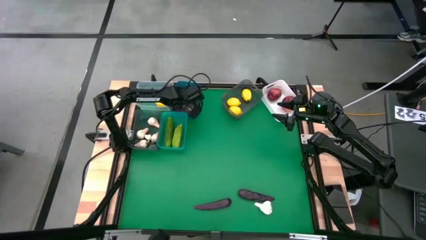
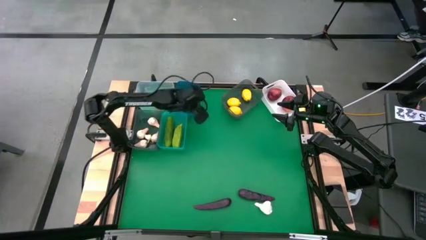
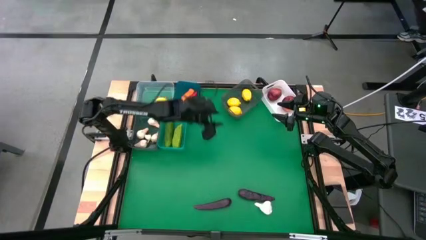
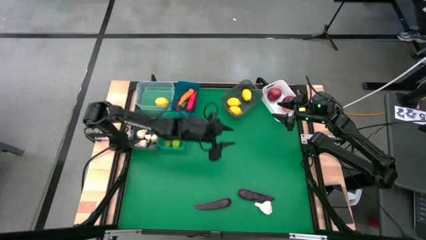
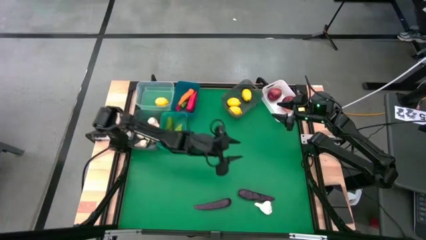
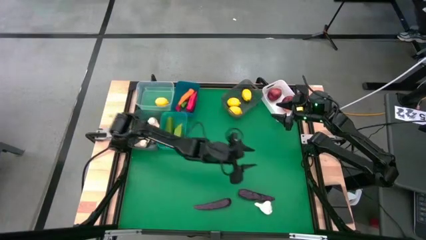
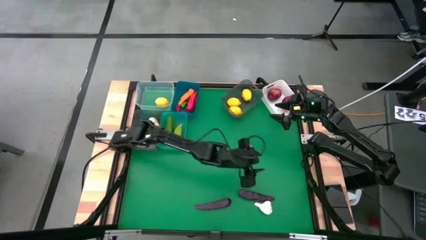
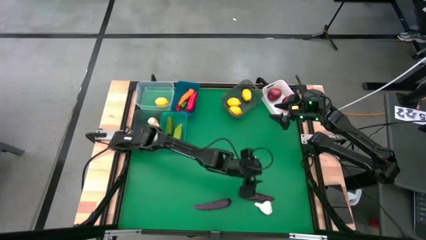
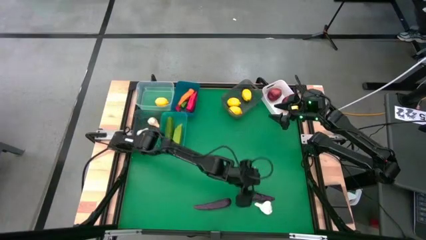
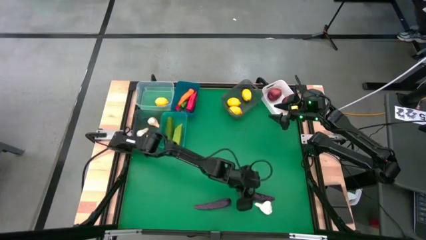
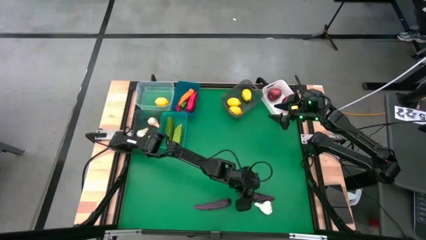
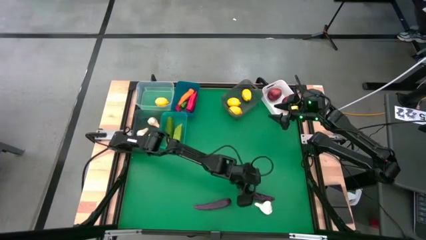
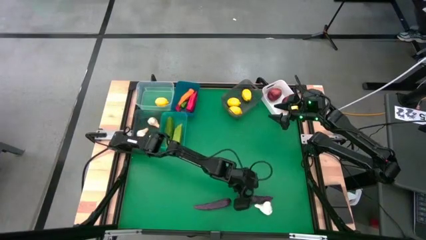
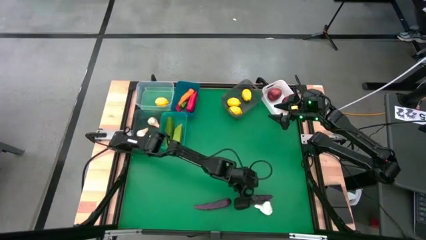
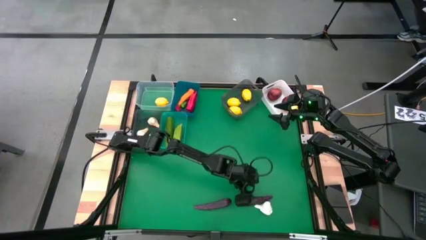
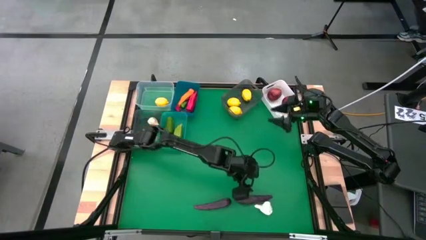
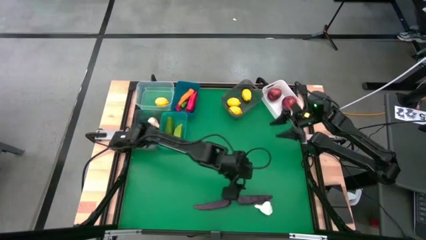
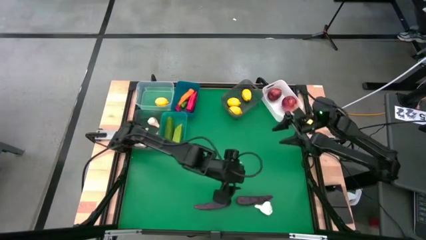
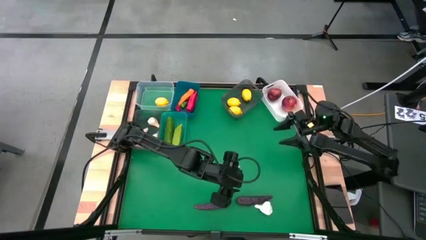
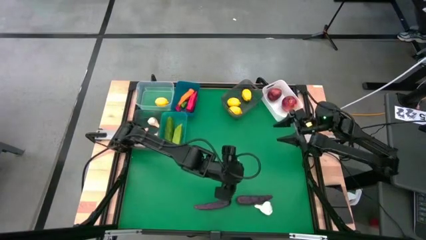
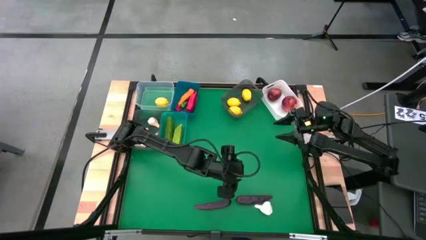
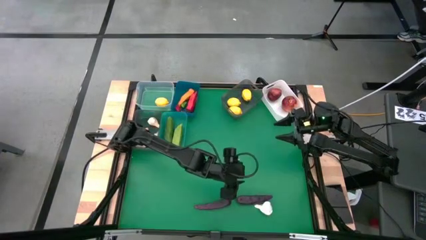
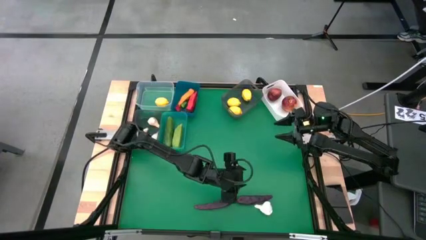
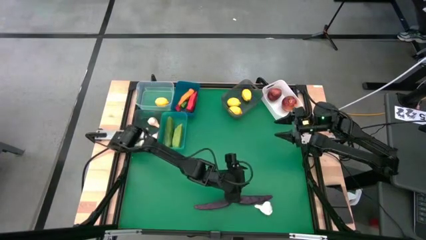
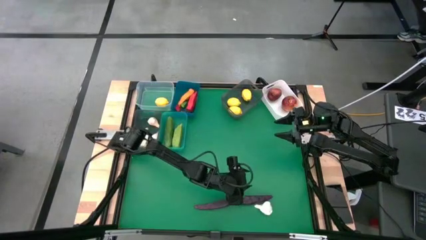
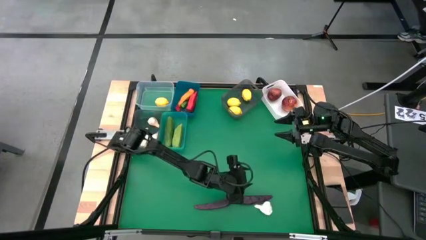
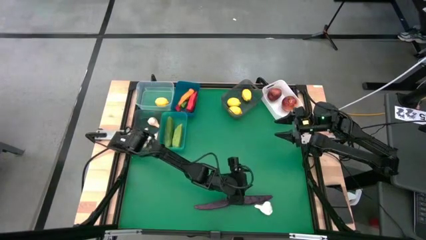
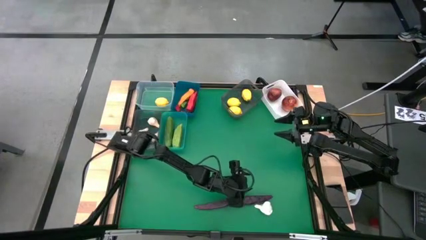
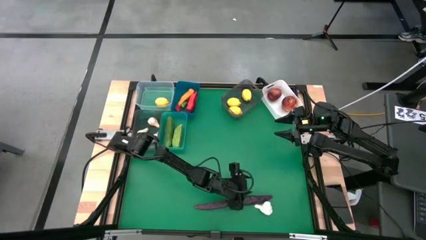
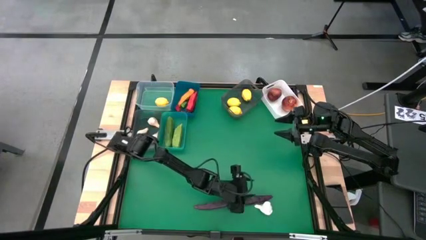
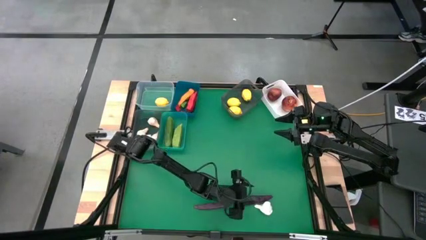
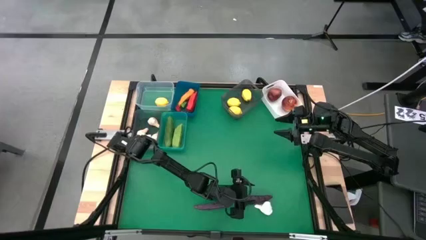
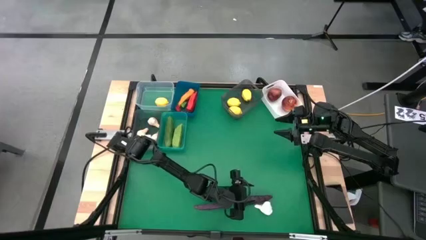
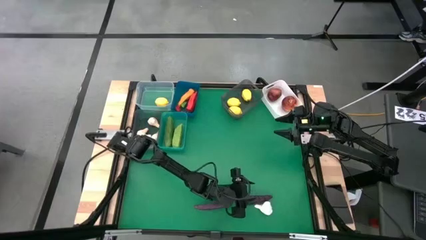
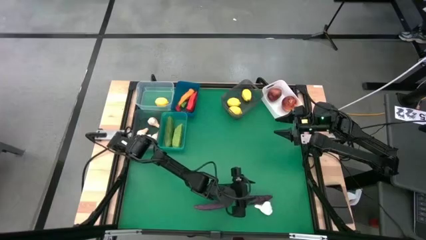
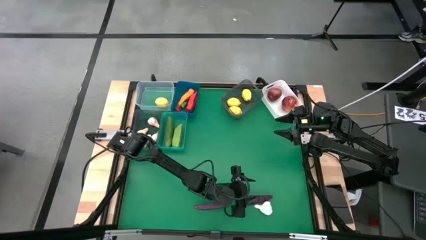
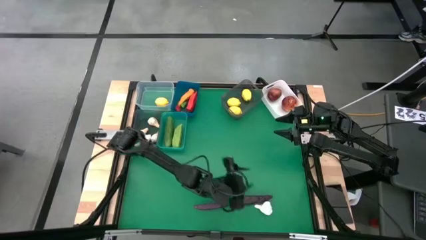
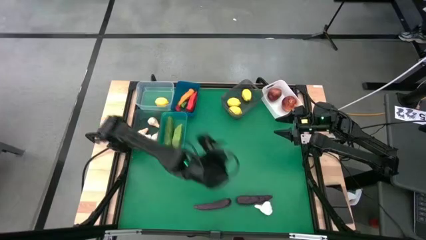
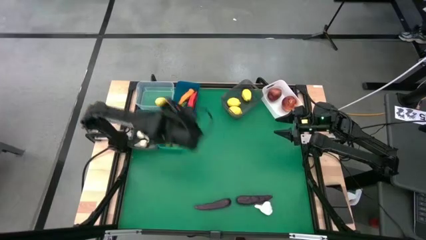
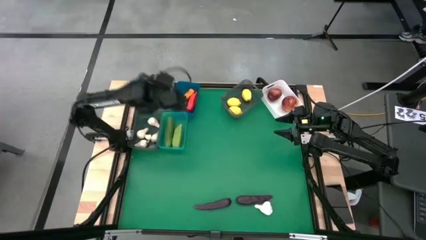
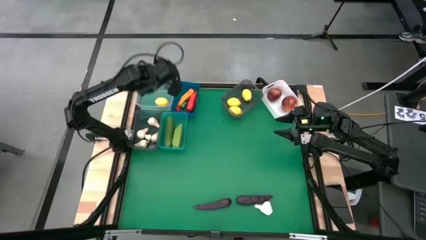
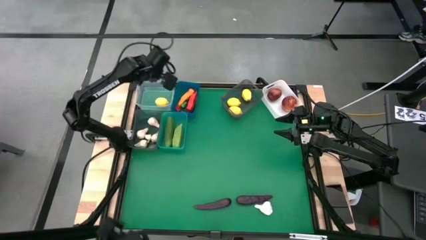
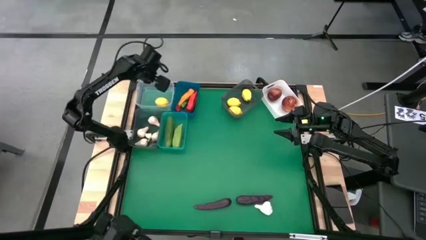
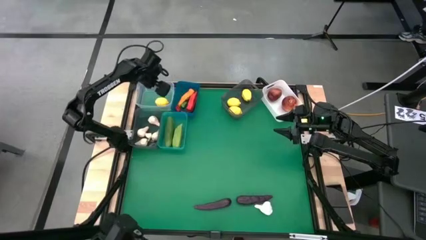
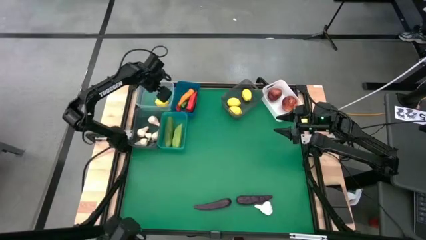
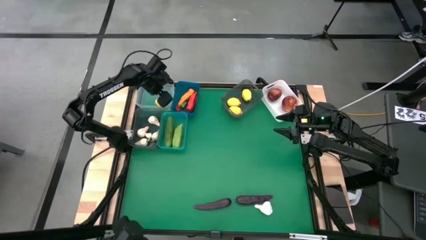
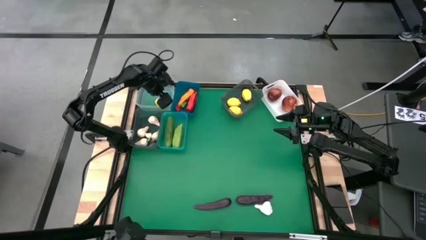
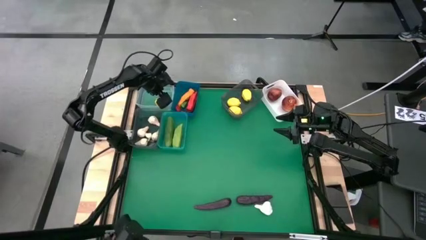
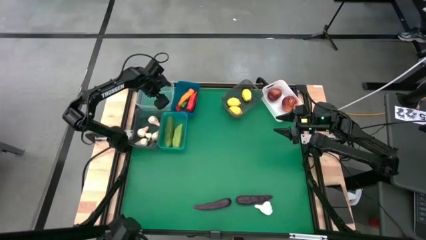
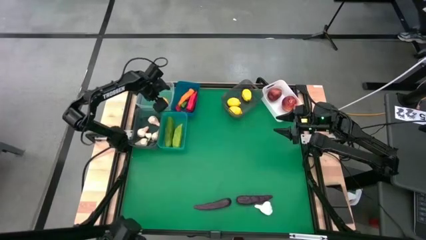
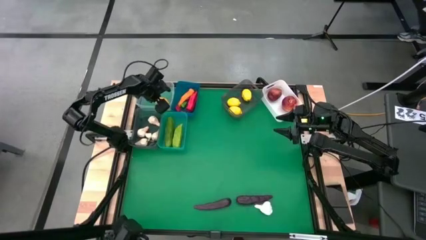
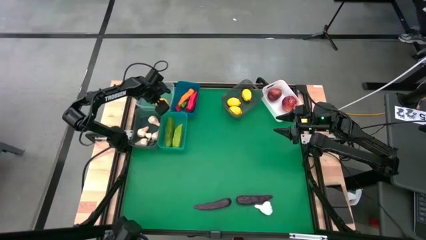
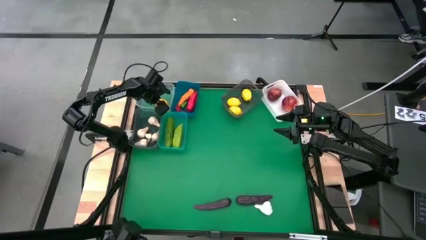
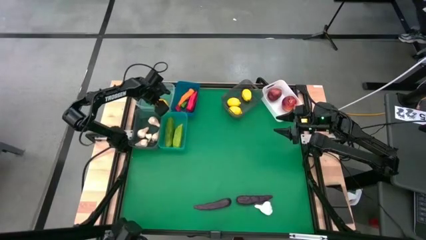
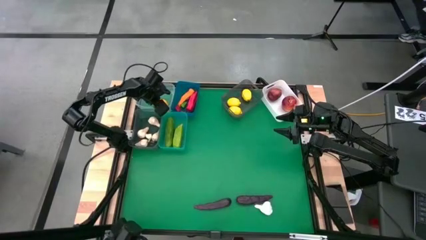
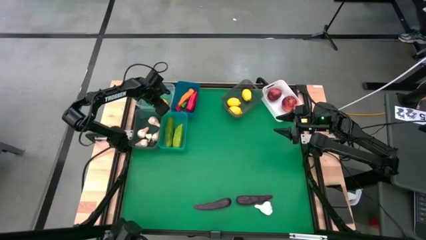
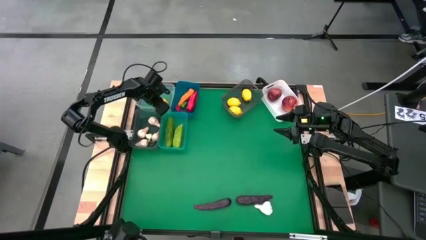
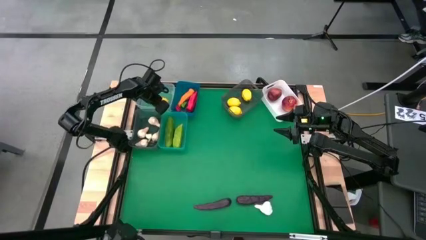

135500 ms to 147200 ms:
Task: Sort produce into baskets
Put the yellow lemon into the right black bin

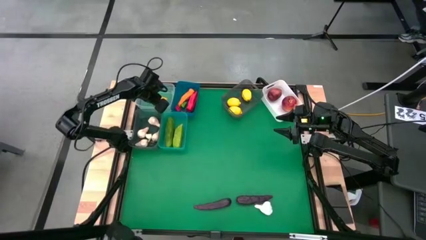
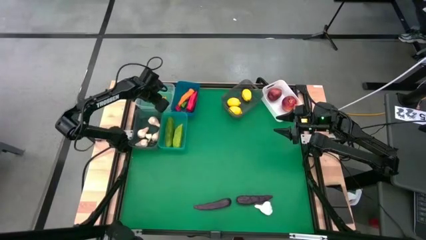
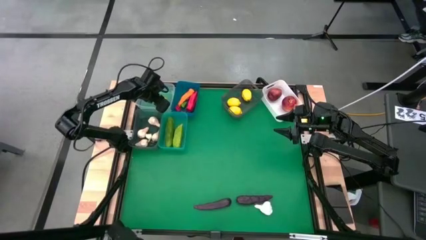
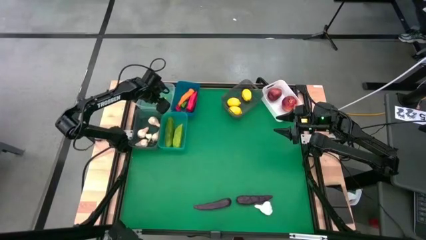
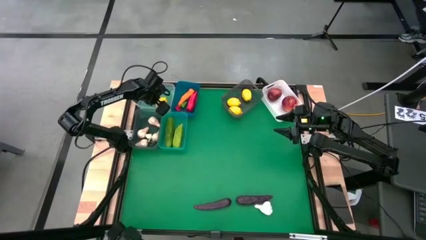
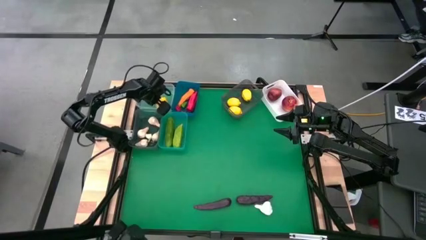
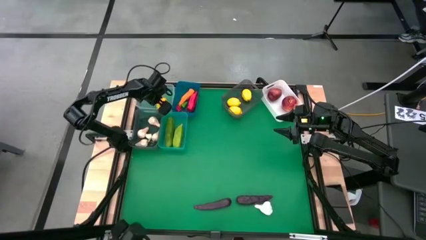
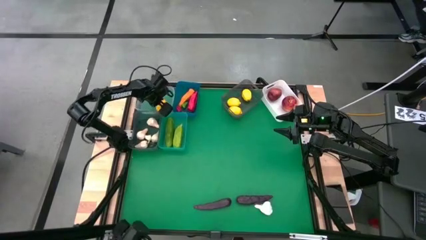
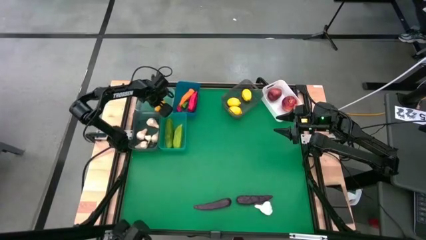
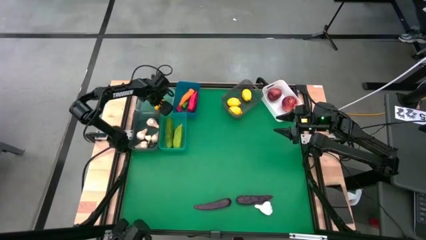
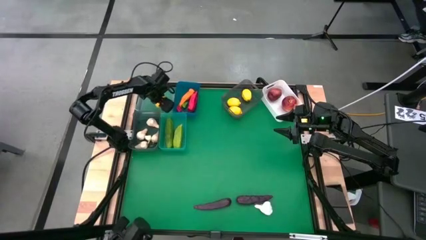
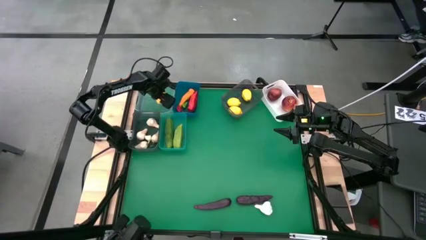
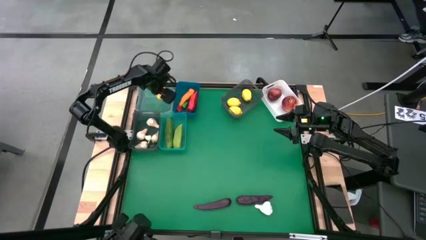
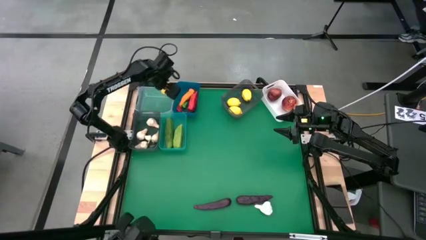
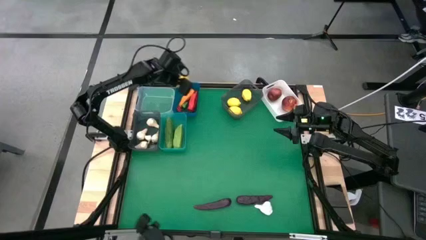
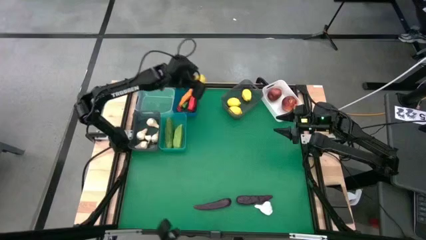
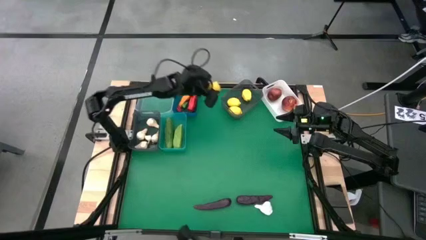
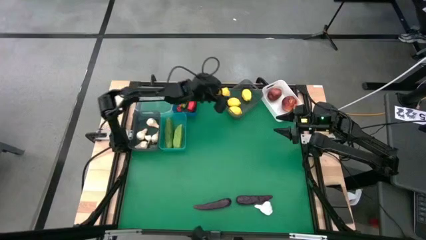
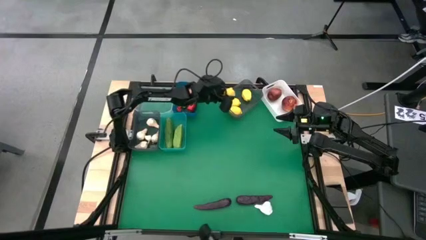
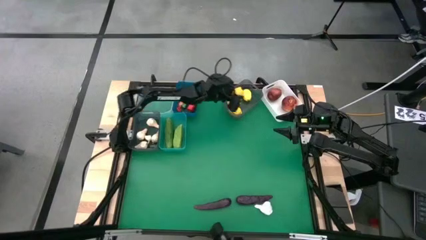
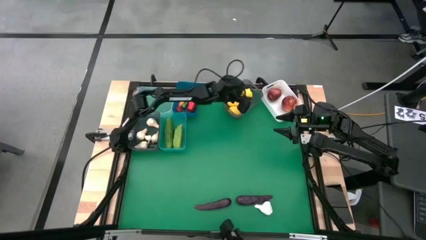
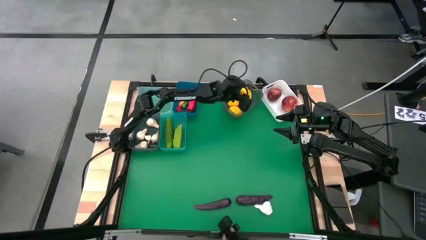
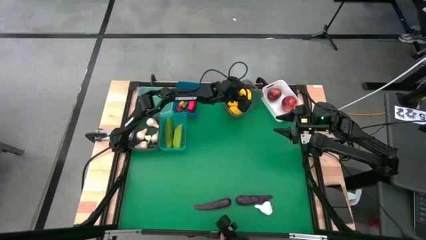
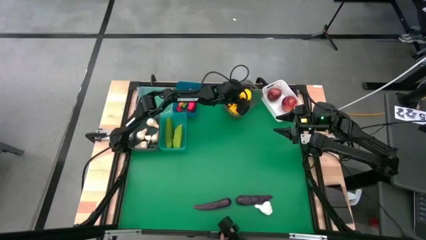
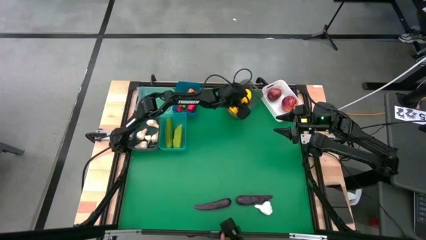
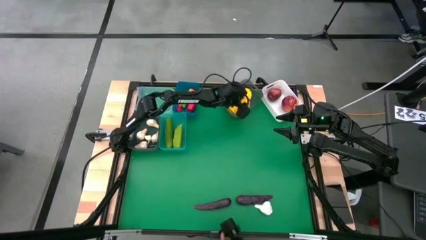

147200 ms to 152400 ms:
Put the yellow lemon into the right black bin
